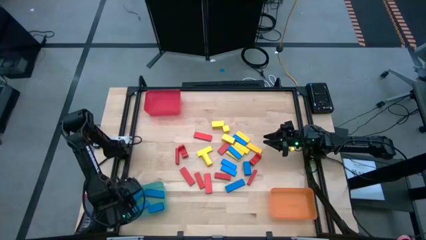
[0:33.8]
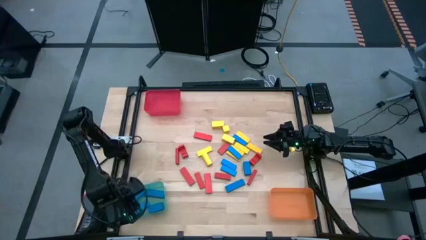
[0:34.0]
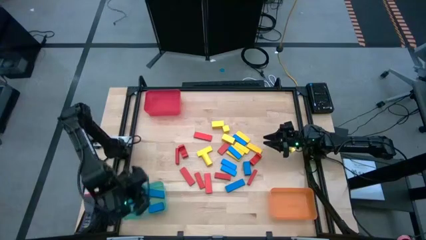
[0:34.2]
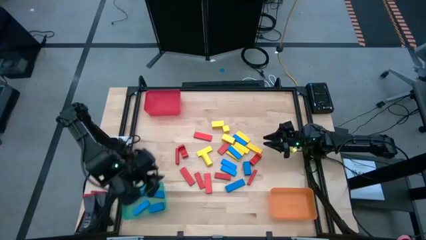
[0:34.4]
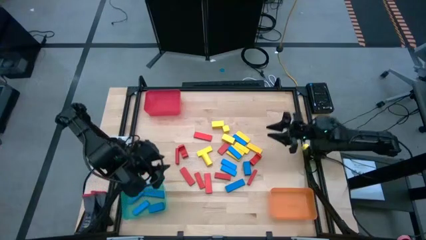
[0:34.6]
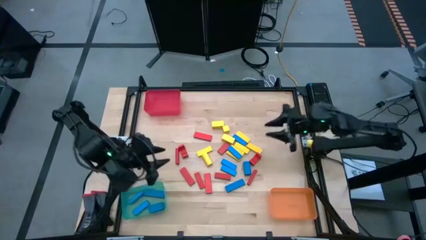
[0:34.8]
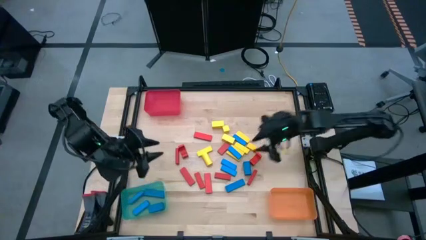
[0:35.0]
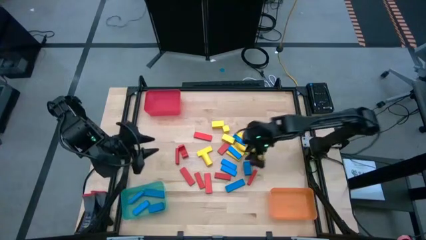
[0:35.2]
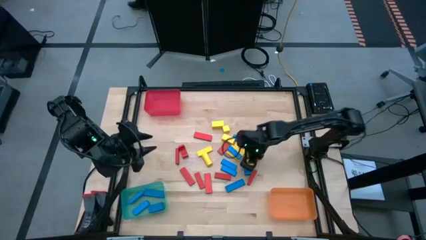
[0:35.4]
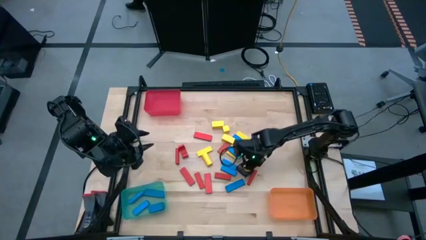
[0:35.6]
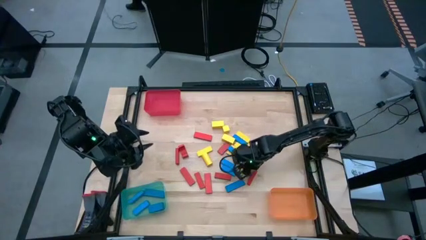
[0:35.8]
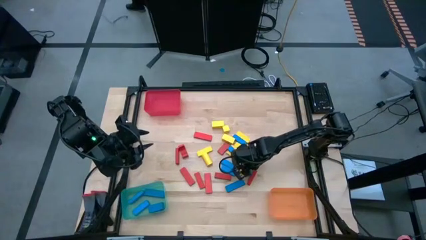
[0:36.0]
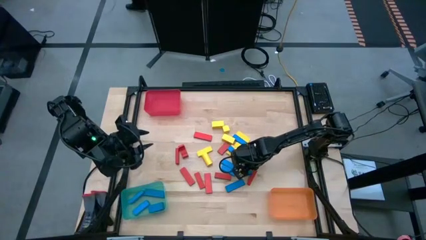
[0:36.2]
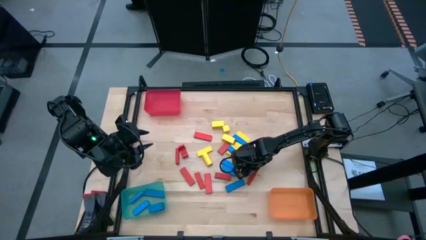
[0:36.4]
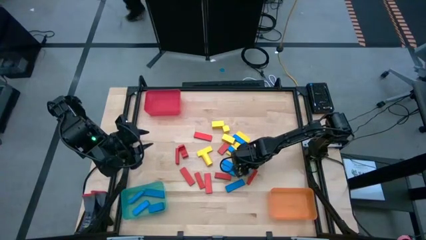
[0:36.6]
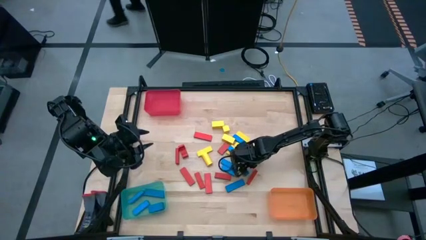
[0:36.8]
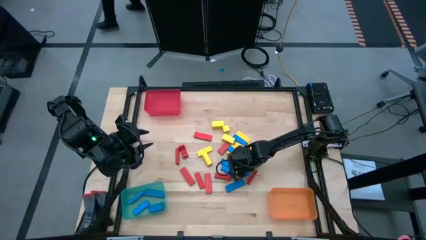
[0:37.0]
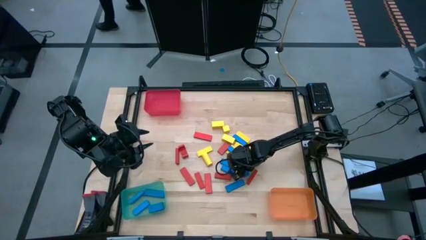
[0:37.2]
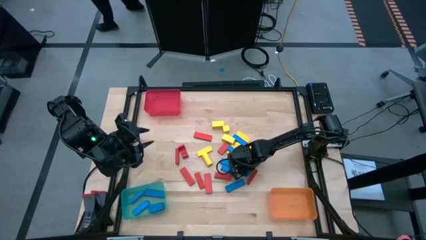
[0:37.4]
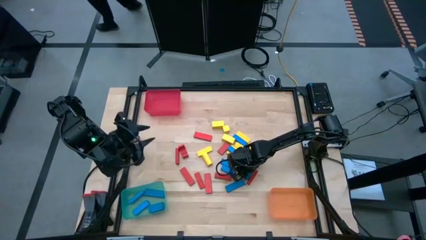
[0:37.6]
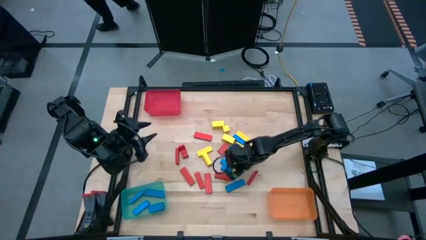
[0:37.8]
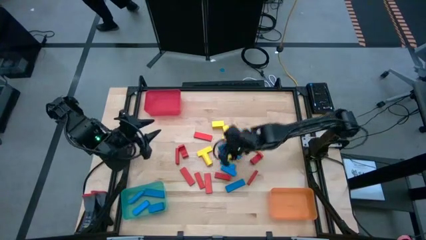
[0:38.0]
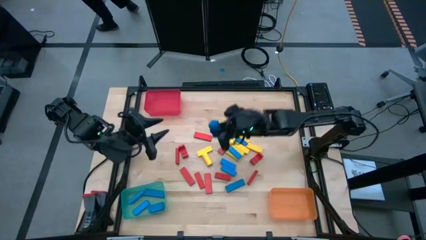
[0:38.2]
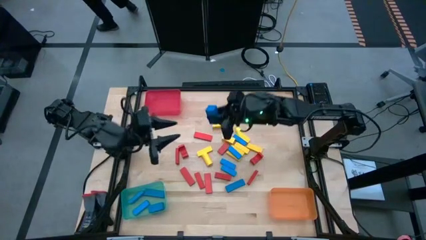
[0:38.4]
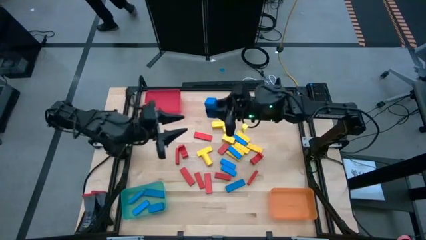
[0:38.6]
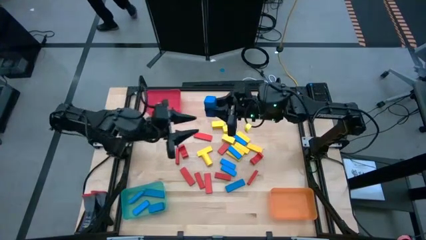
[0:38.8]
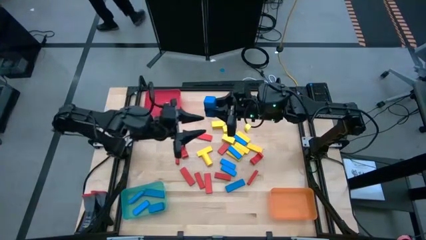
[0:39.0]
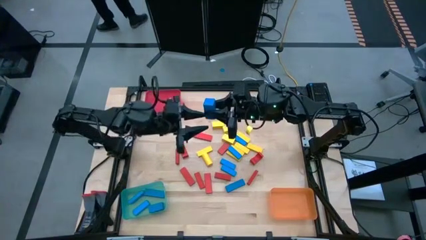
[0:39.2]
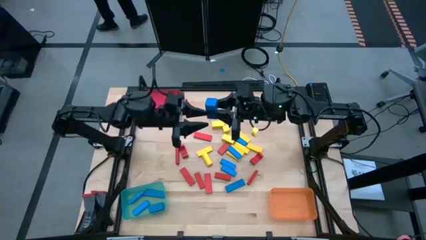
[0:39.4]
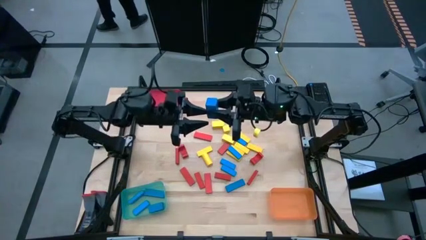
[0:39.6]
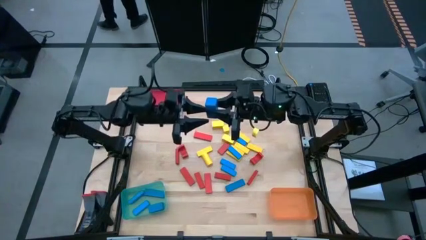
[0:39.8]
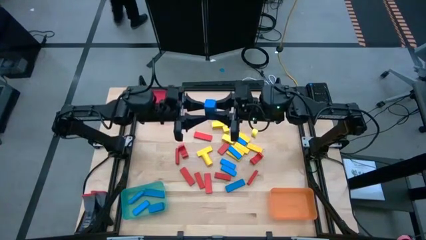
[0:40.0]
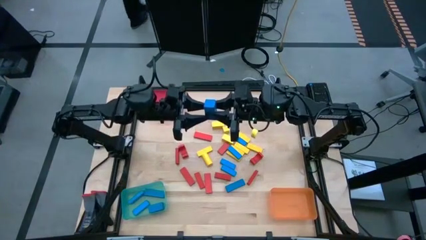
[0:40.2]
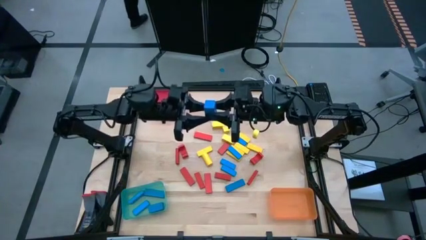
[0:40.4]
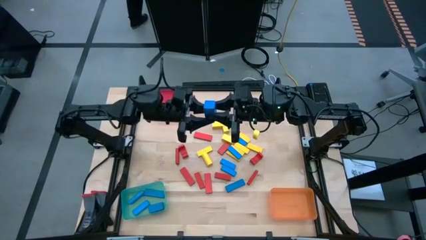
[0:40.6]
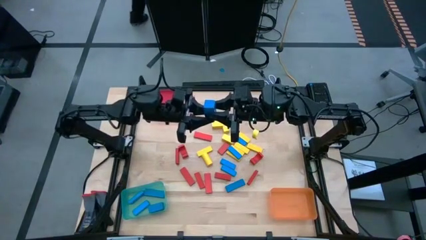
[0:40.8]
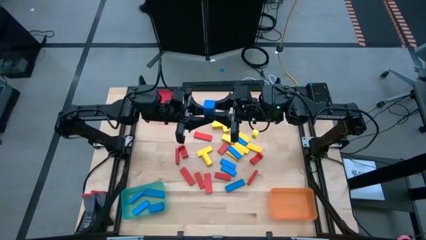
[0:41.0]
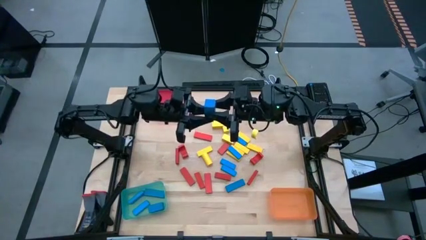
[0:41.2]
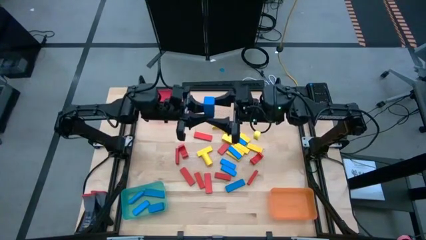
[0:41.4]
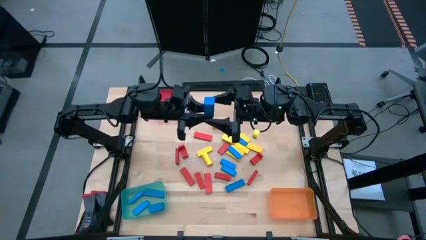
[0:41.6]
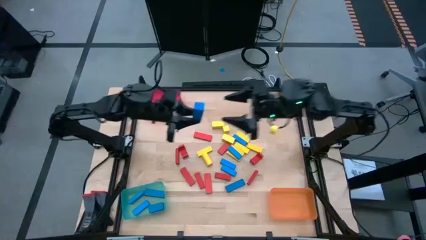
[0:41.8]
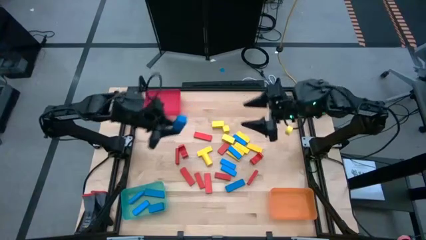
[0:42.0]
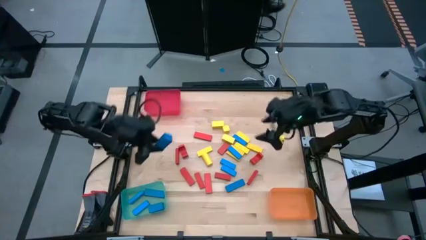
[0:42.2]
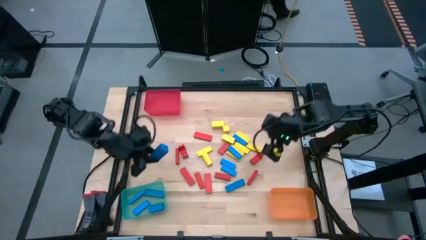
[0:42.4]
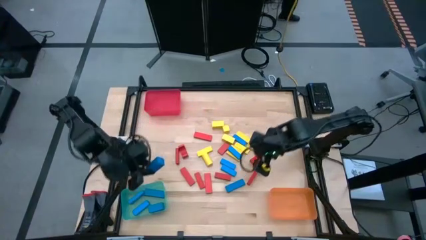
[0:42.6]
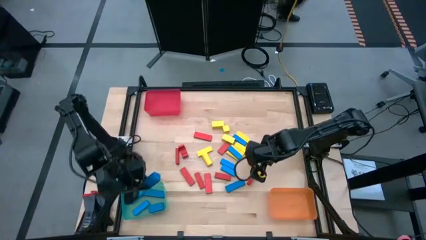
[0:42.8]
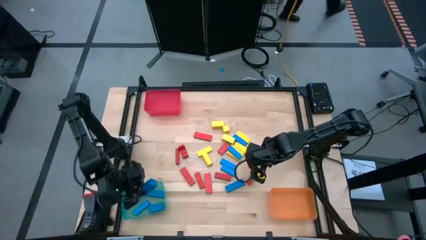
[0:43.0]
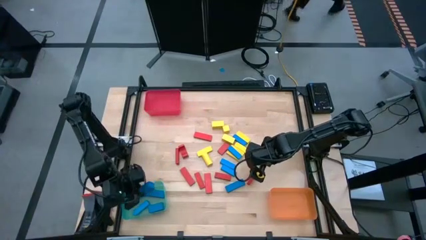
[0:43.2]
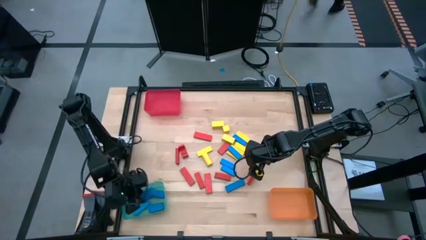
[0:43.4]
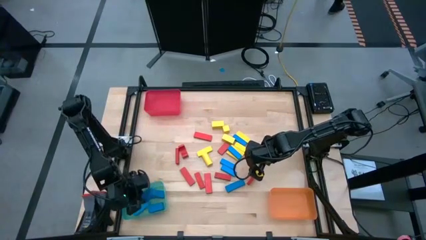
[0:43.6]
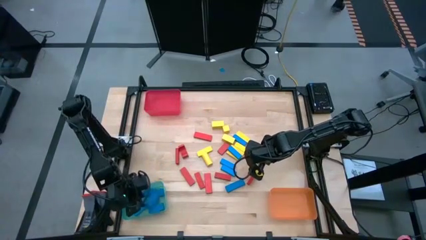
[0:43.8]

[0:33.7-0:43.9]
Task: Sort blocks
Put the blue block into the green bin

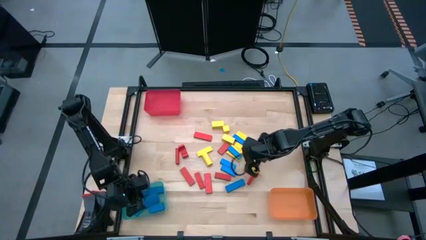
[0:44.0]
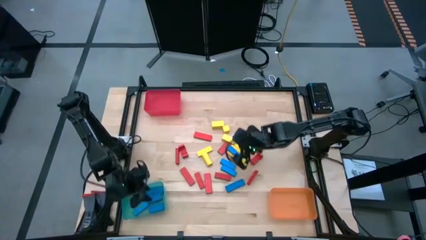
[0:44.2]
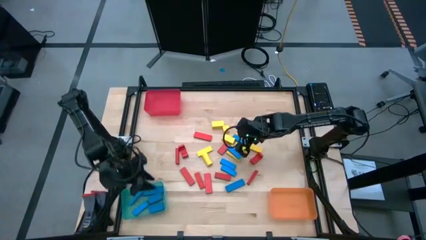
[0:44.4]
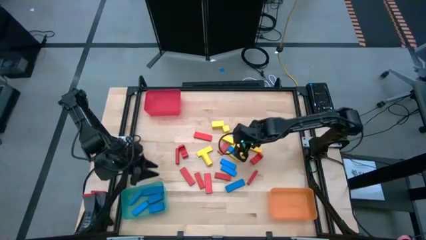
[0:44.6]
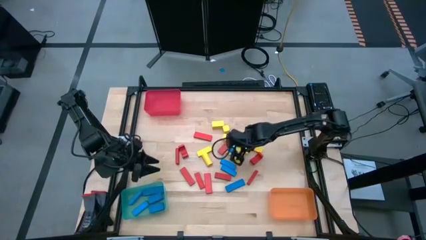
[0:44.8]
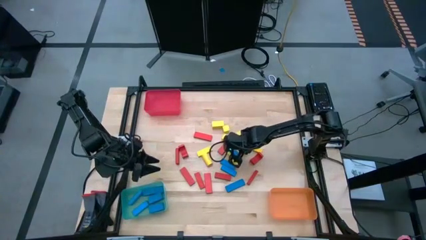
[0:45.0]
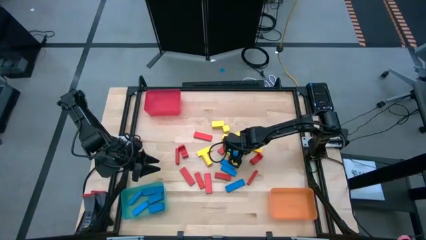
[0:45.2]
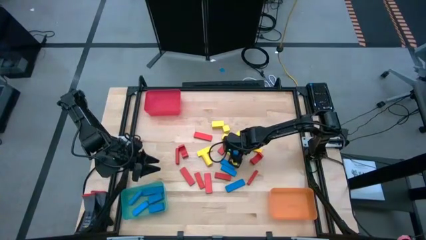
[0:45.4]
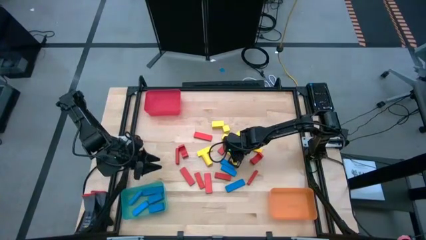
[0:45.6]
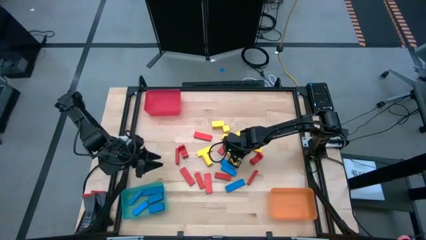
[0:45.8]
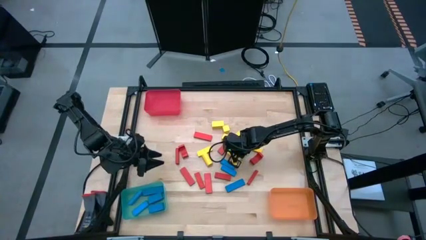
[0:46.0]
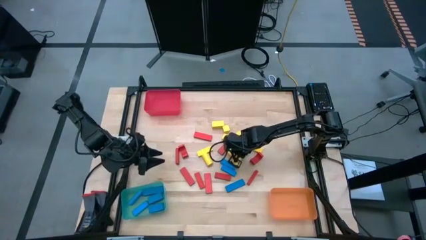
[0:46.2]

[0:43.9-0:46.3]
Put the blue block into the green bin

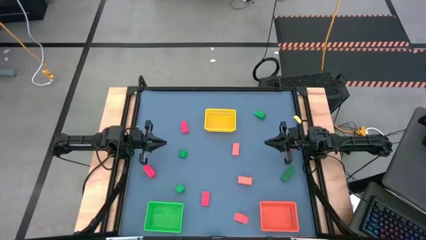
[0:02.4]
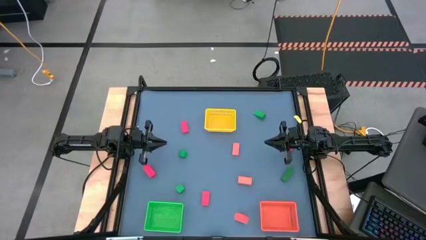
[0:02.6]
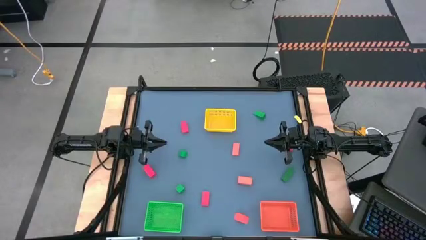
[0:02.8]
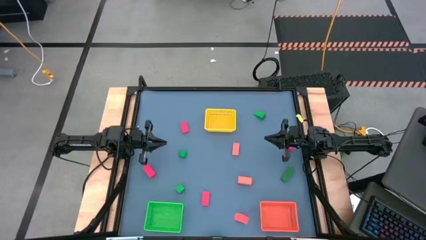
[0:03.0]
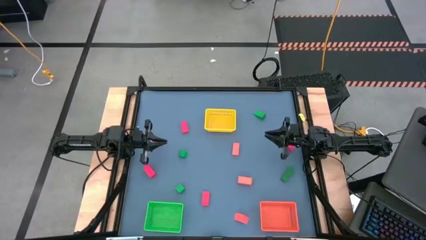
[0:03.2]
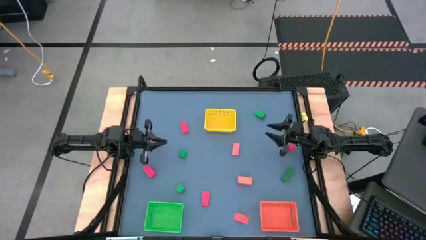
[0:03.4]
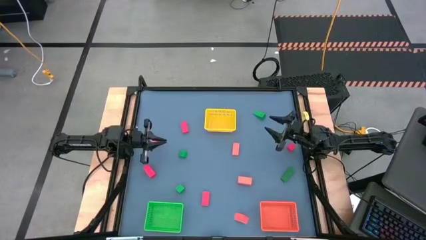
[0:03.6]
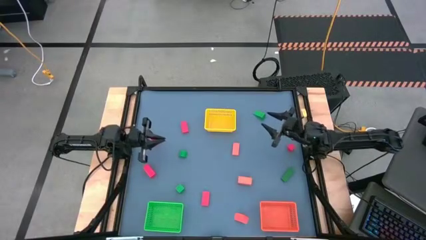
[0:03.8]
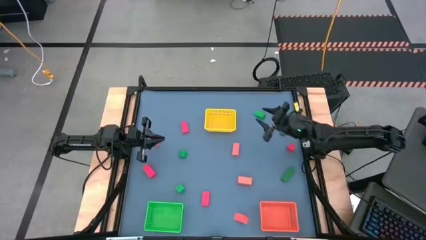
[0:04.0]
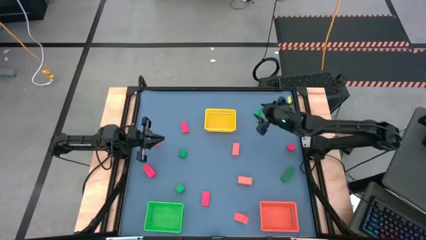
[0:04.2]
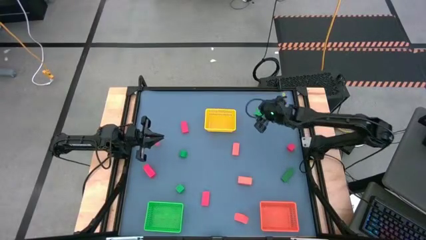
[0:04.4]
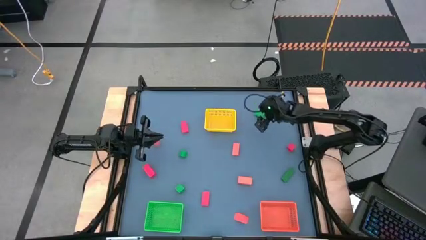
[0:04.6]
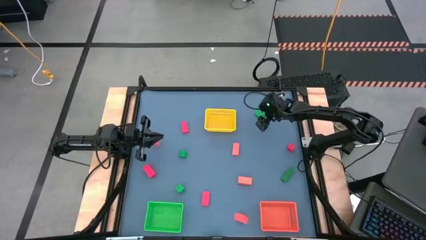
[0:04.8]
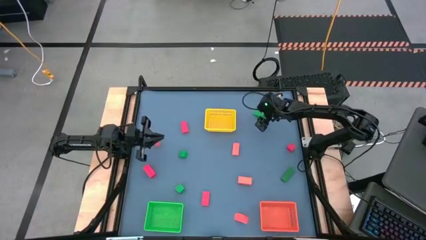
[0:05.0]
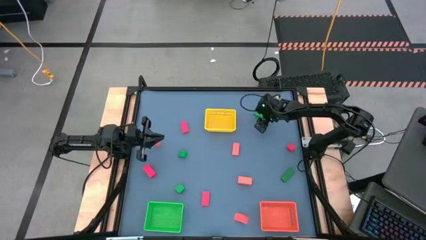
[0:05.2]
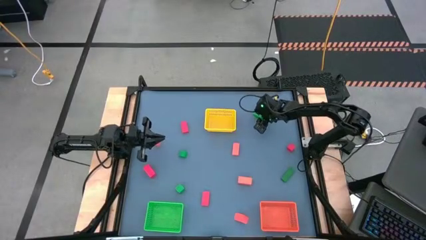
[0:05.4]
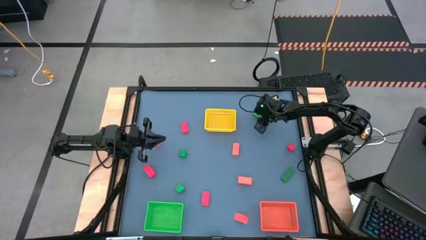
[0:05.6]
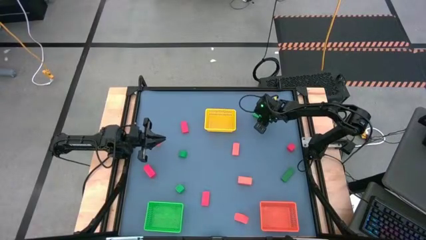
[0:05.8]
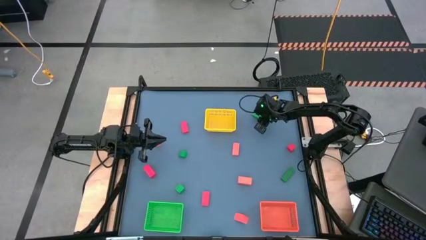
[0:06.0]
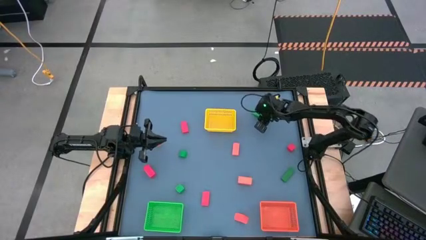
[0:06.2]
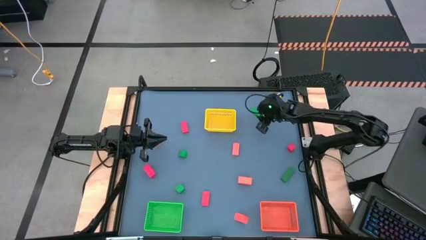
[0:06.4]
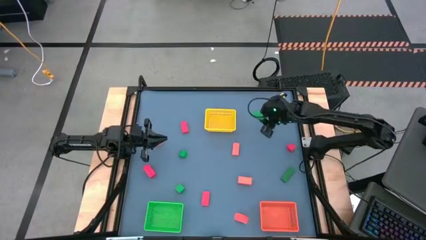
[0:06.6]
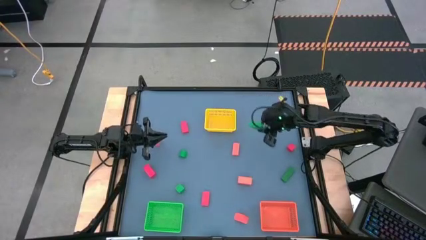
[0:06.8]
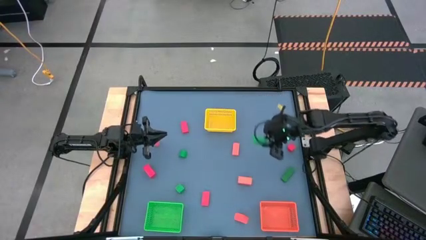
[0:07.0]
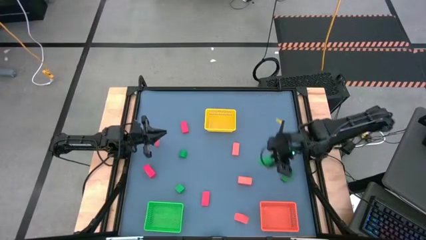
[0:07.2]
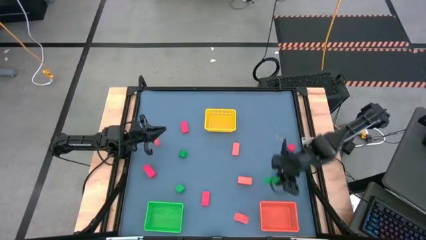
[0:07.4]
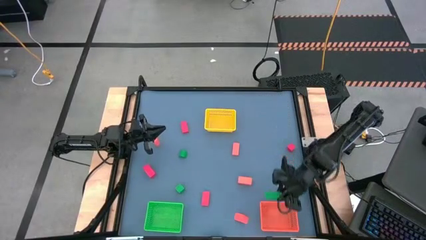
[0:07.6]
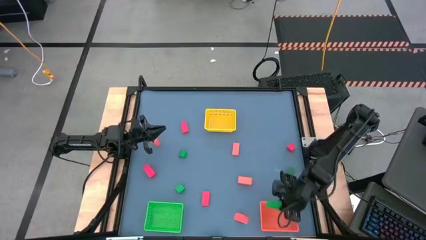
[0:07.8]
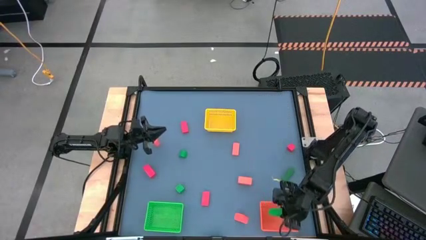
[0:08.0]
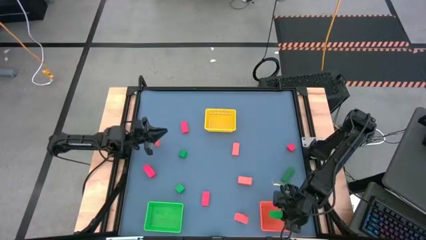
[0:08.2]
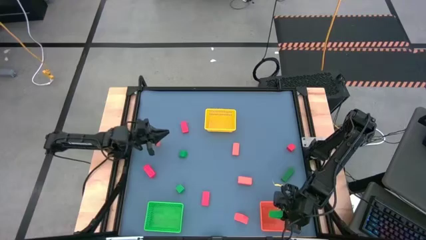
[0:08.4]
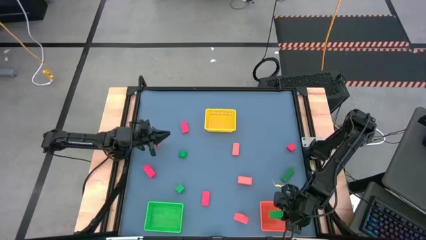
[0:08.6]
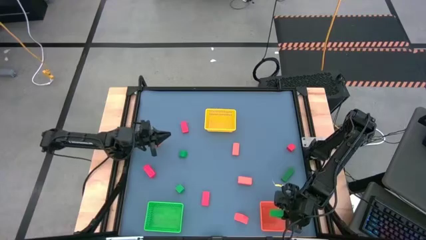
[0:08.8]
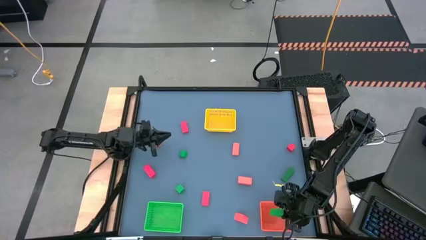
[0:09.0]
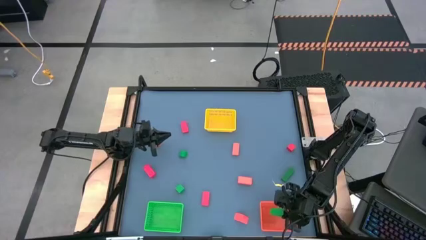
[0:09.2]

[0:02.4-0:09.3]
Task: Sort & place blocks by color
Put the green block into the orange bin
